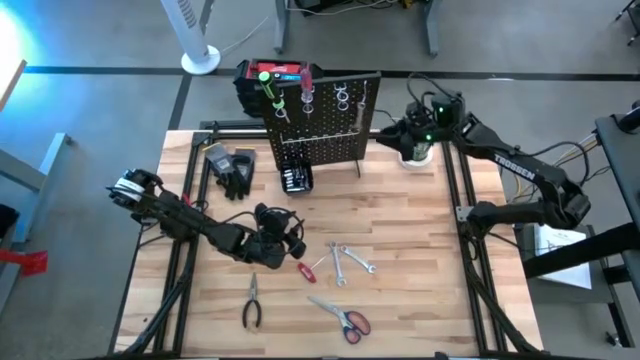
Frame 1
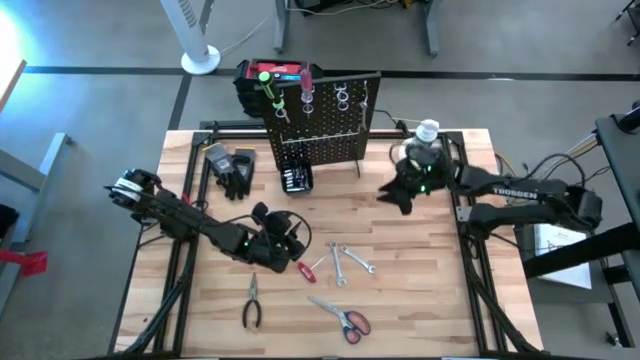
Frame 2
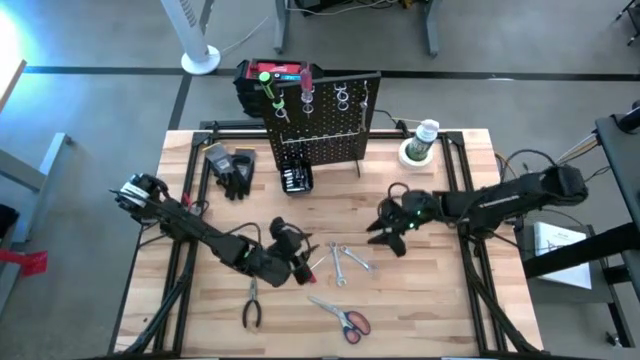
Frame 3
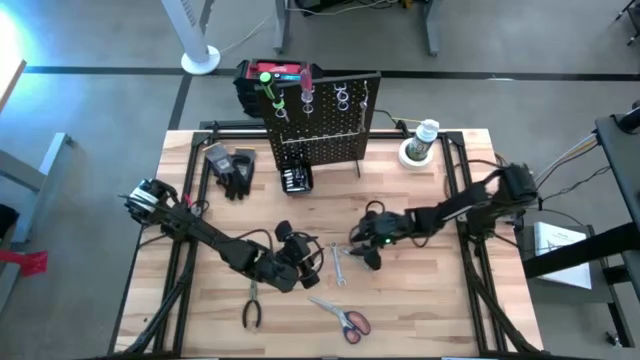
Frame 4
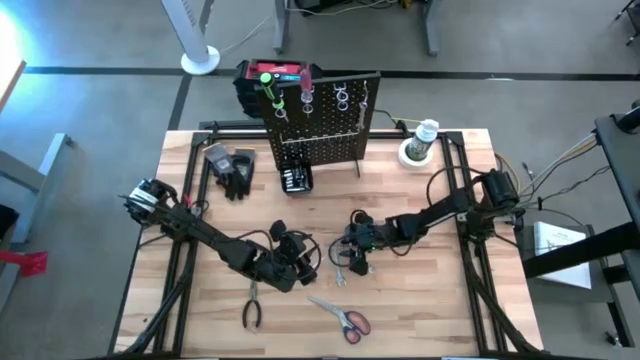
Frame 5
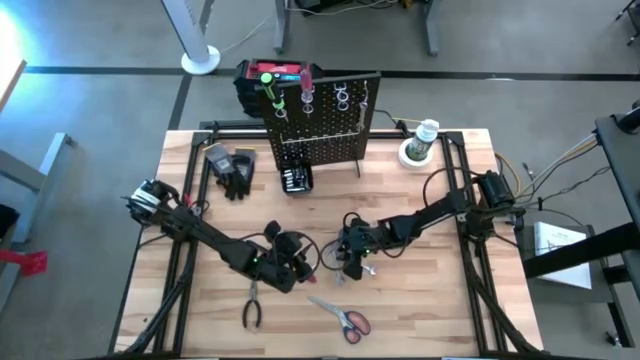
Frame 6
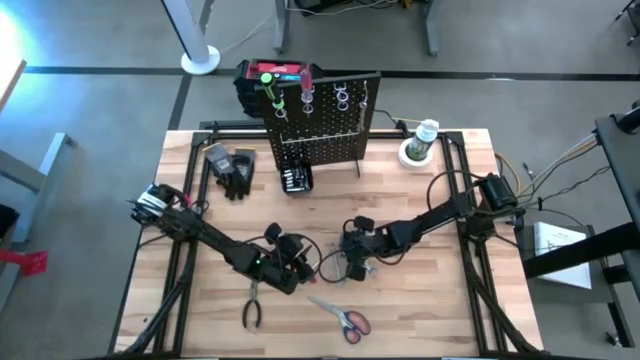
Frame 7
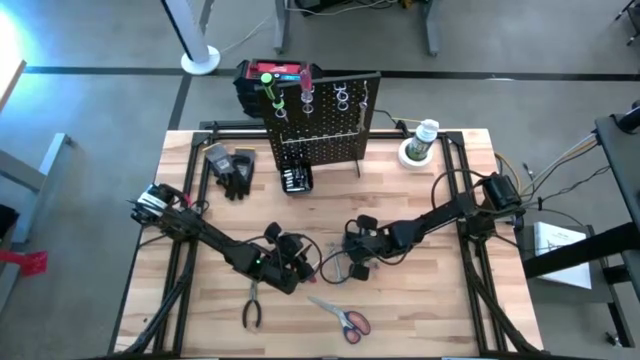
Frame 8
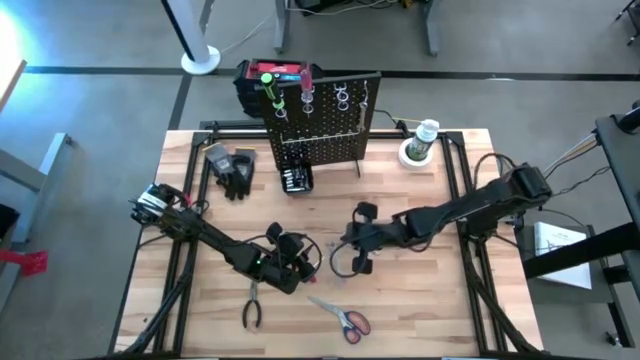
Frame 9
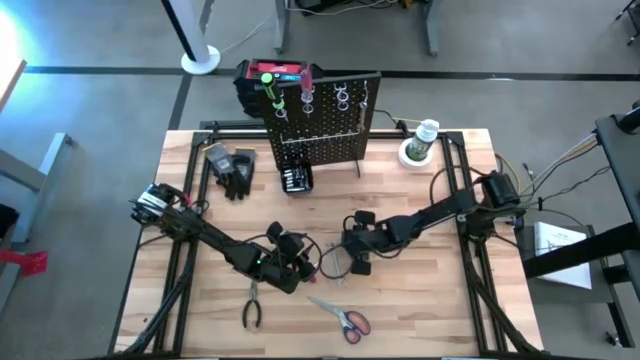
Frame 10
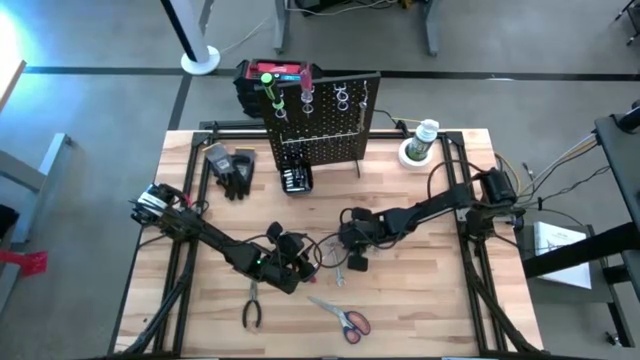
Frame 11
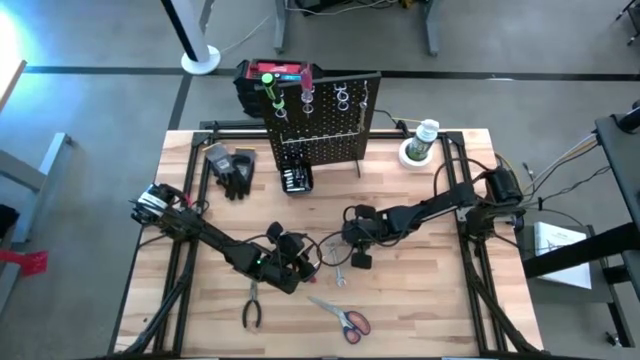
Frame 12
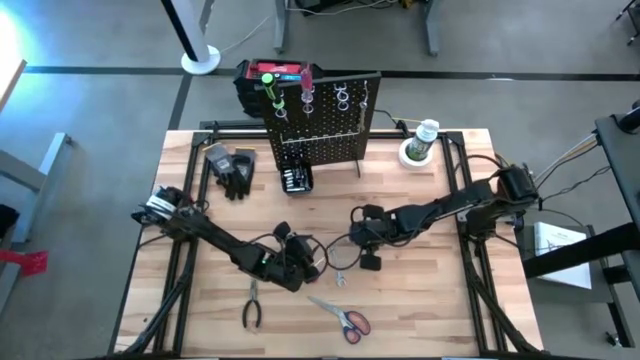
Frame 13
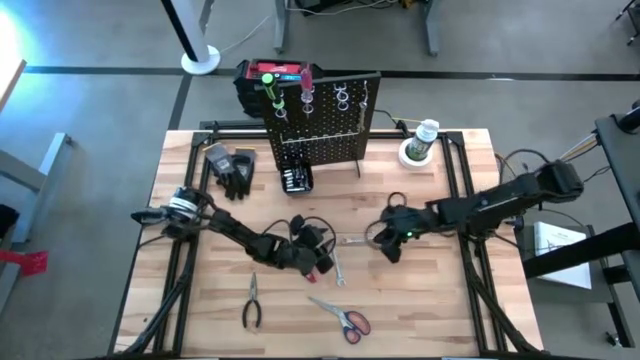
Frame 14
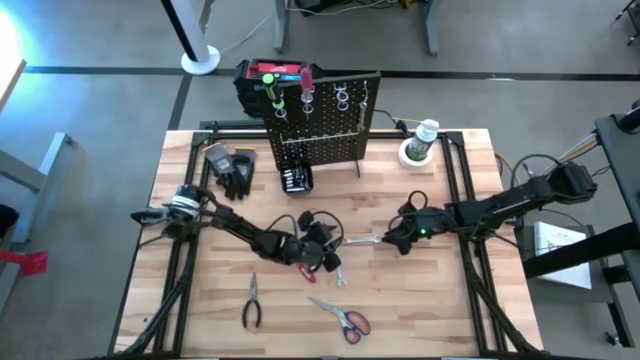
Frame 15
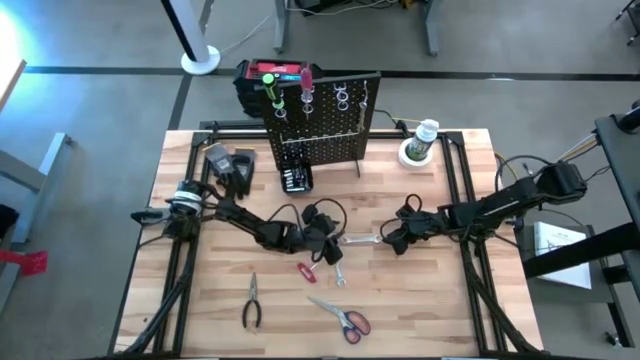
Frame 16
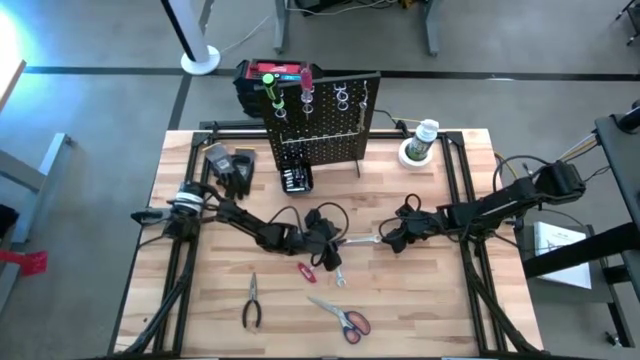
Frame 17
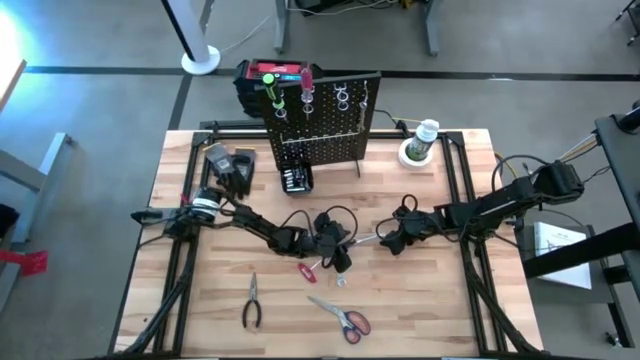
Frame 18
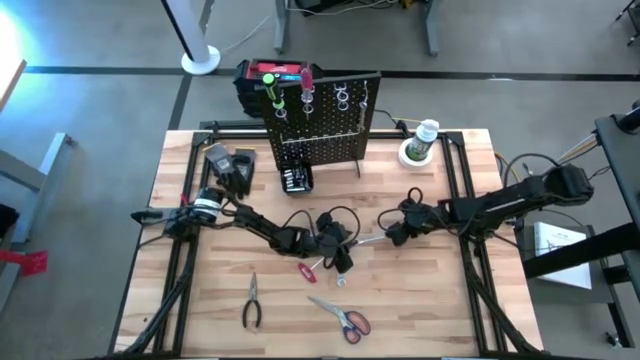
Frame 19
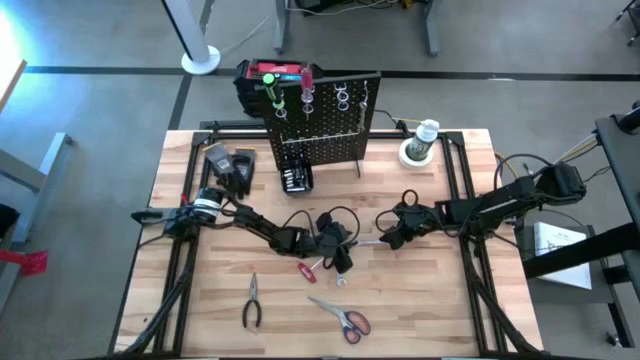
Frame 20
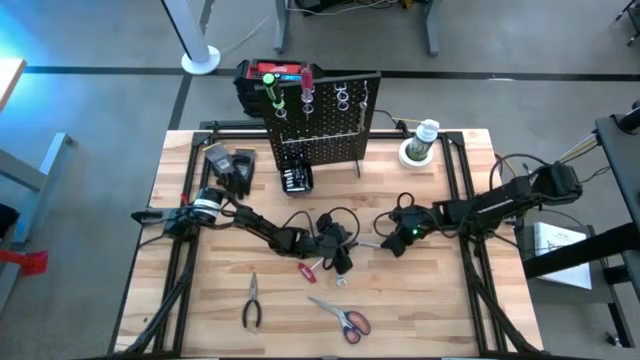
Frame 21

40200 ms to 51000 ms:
Task: Hang tools onto peg board
Hang the right combination wrench on the pegboard

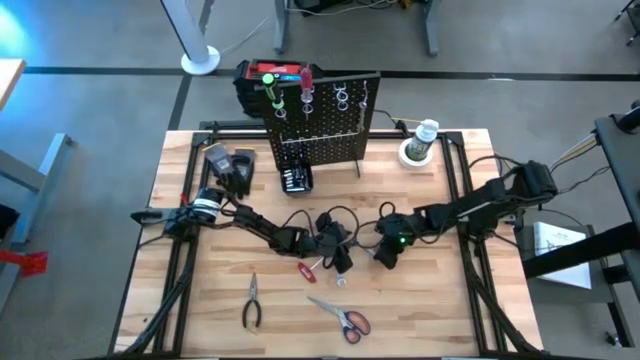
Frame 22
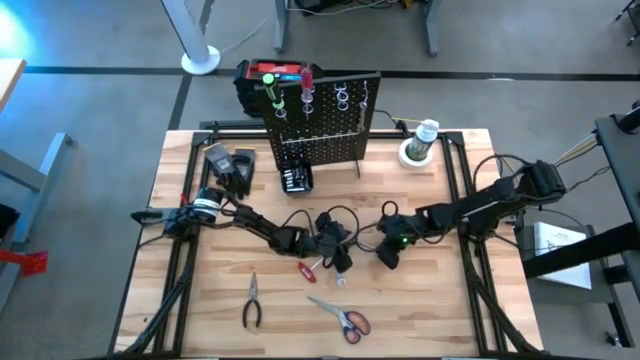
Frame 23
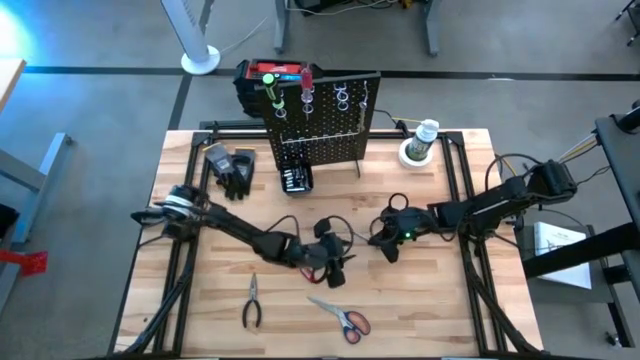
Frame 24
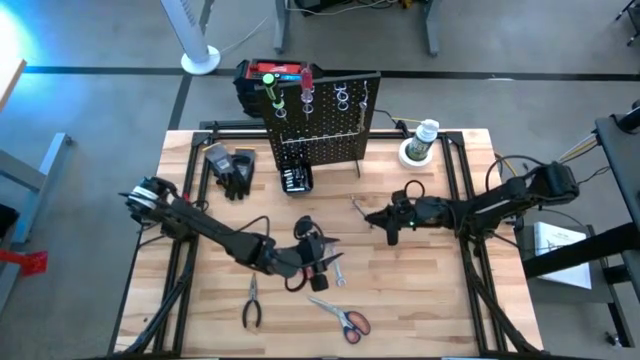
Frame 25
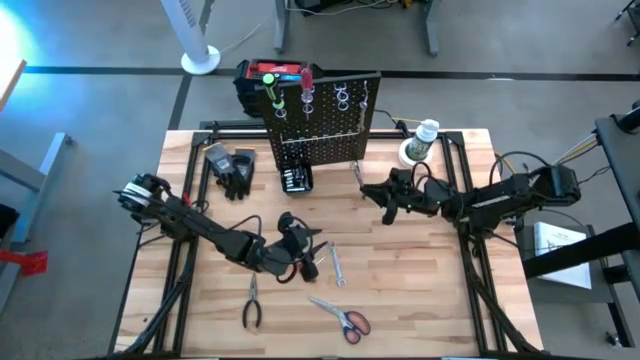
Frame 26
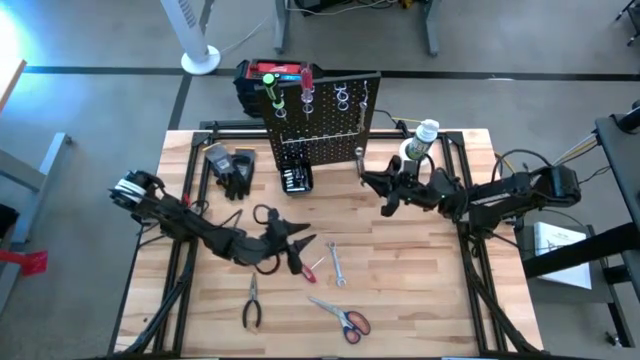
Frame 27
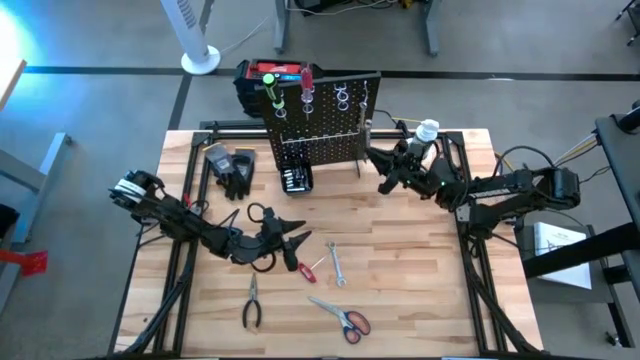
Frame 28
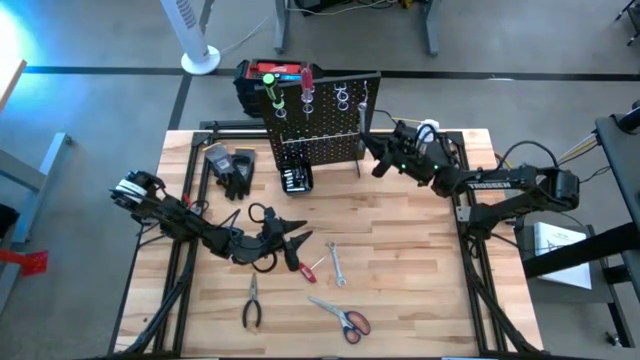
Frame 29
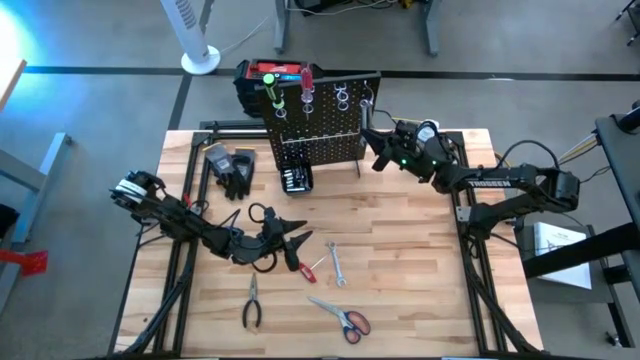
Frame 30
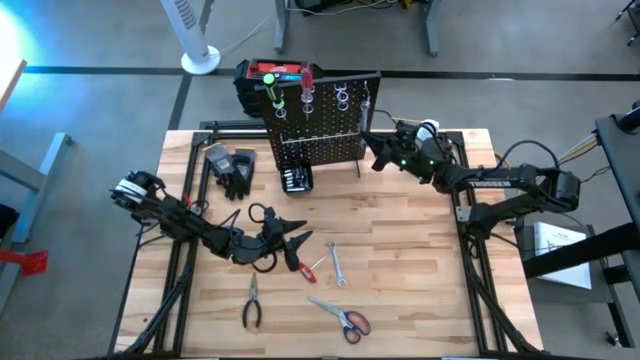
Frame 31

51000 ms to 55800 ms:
Hang the right combination wrench on the pegboard

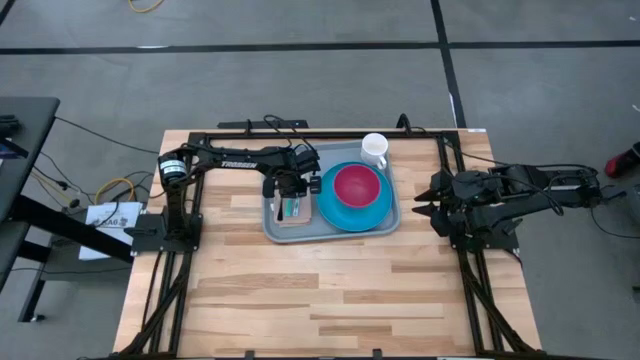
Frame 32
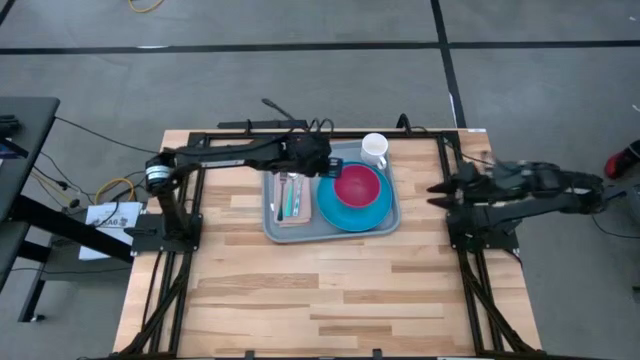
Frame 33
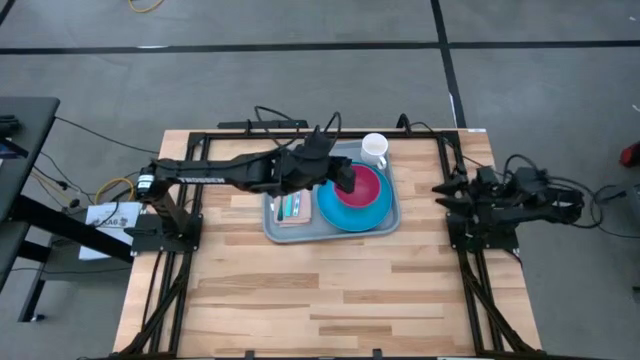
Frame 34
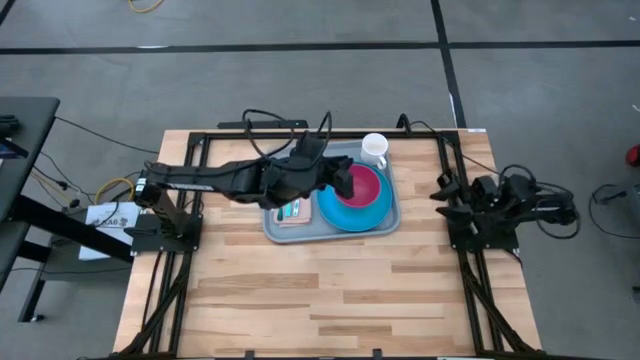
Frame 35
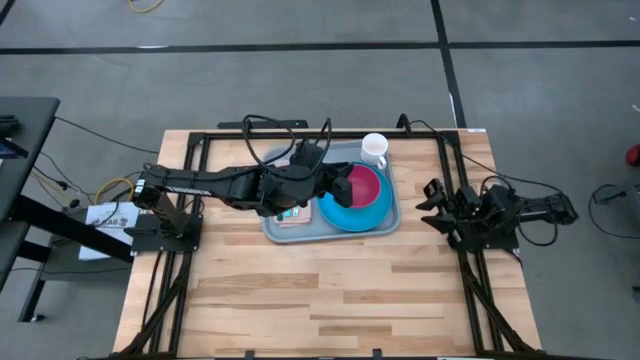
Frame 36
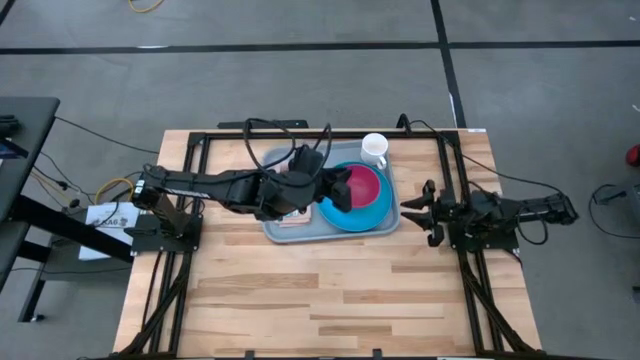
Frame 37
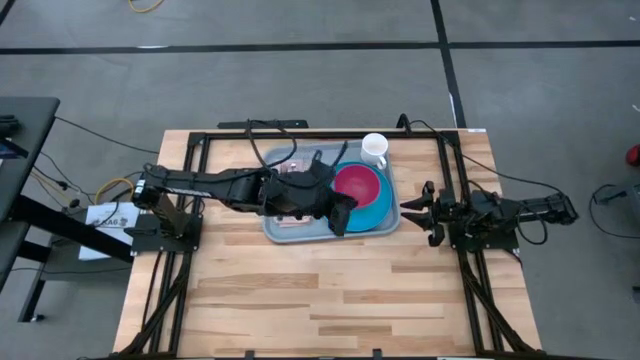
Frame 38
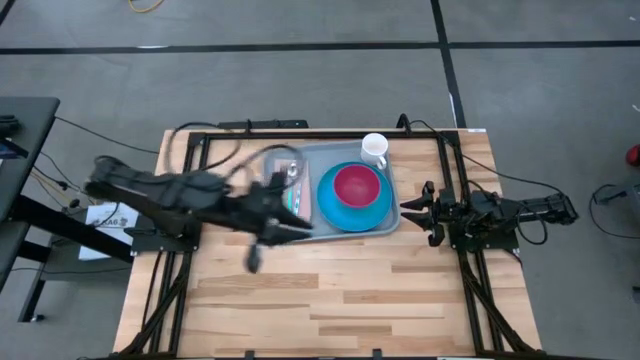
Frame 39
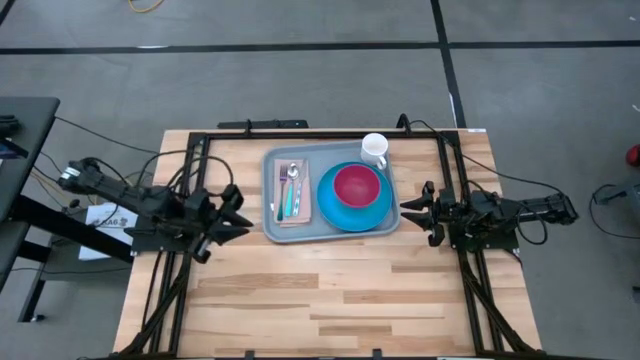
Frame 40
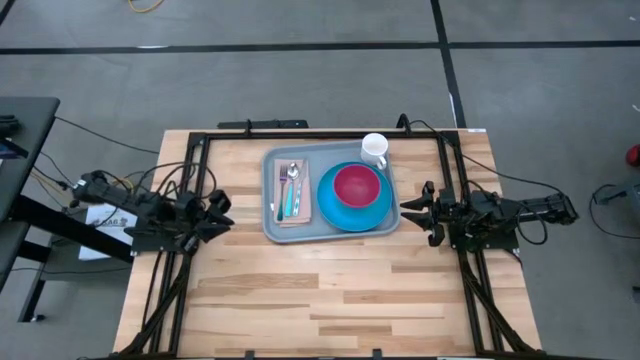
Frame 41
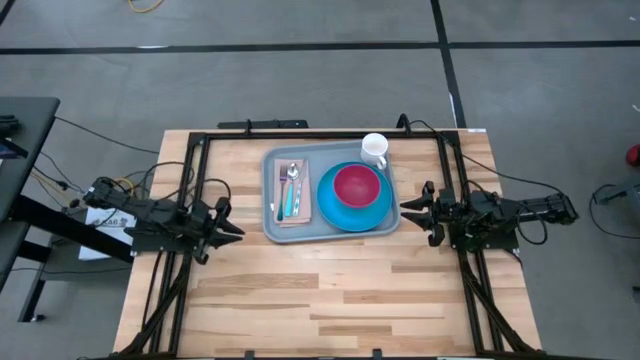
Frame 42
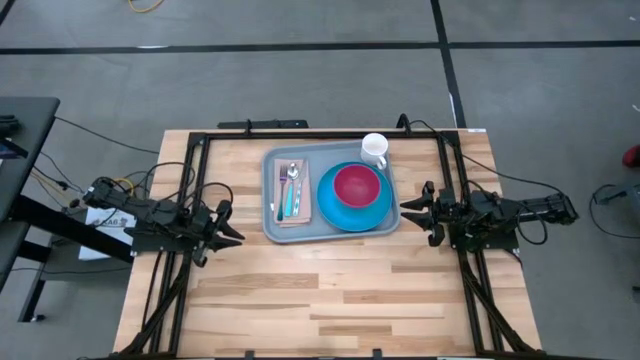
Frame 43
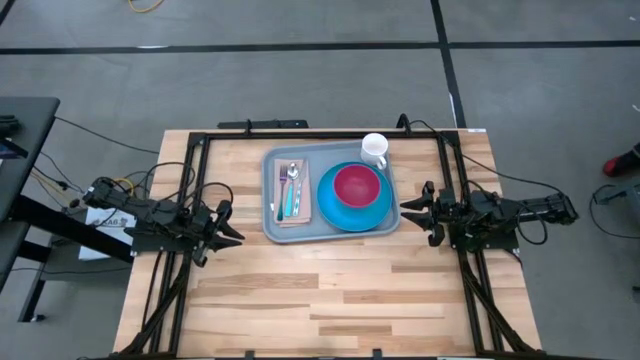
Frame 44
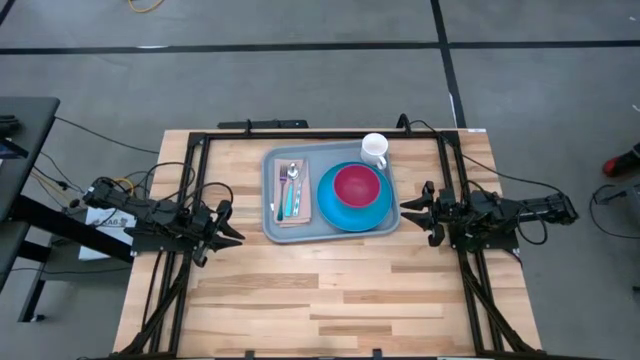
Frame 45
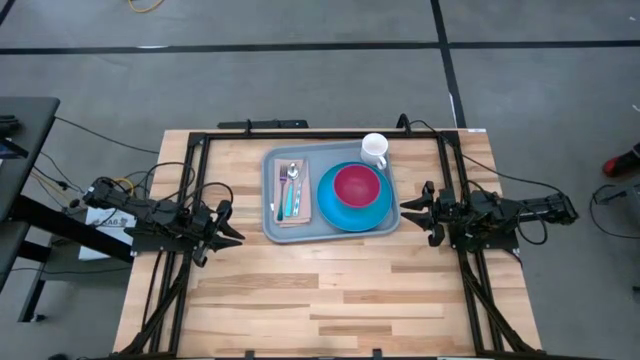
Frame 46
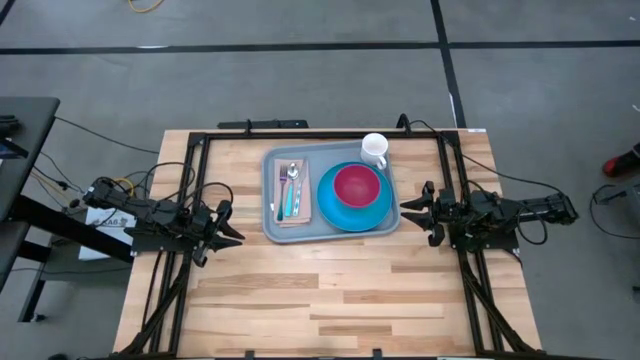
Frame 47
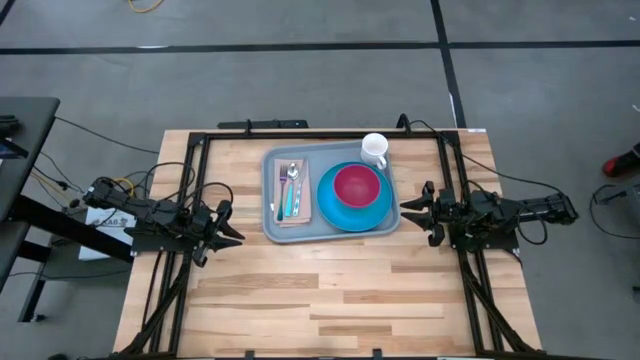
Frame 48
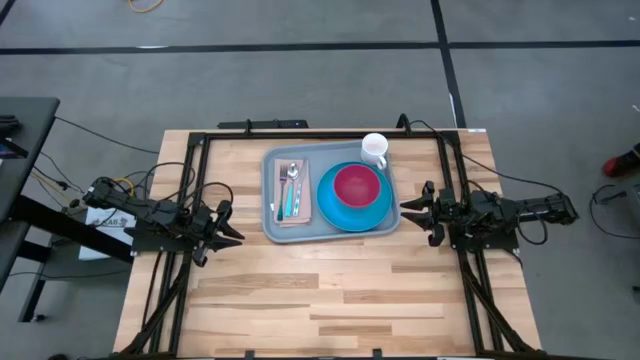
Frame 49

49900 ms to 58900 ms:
Task: Set up tray
Return to Home Position
